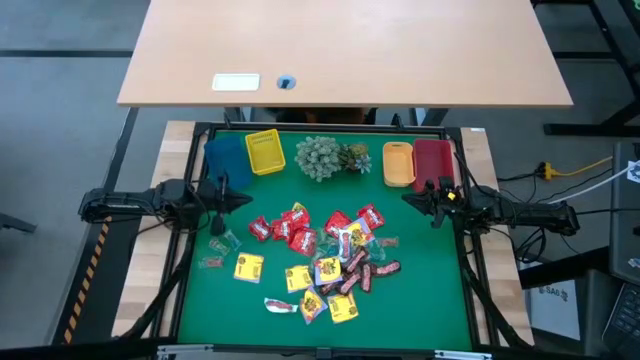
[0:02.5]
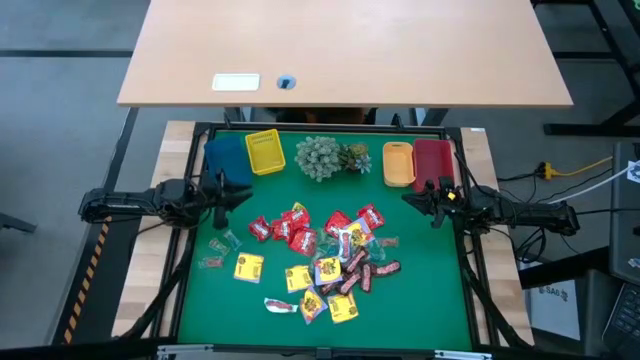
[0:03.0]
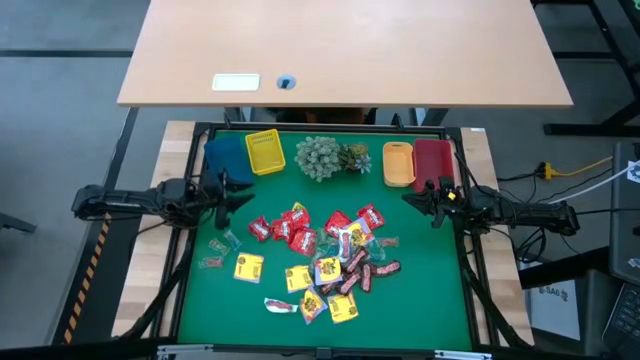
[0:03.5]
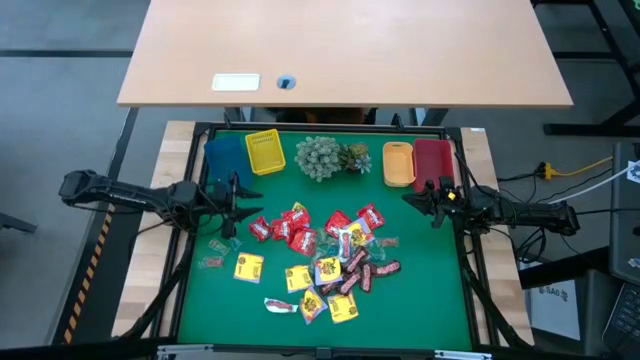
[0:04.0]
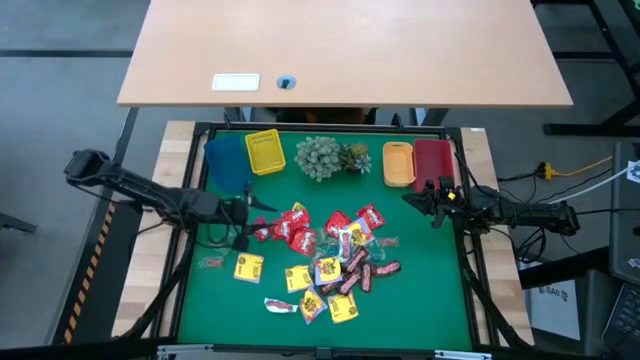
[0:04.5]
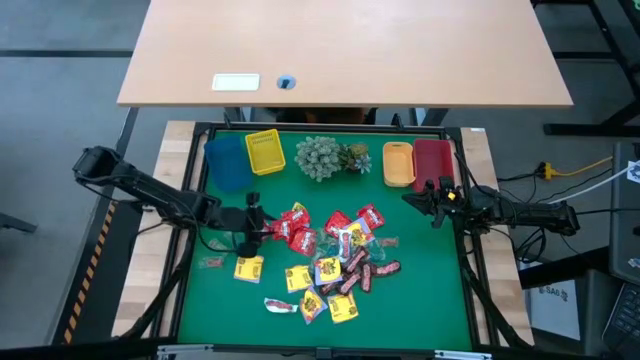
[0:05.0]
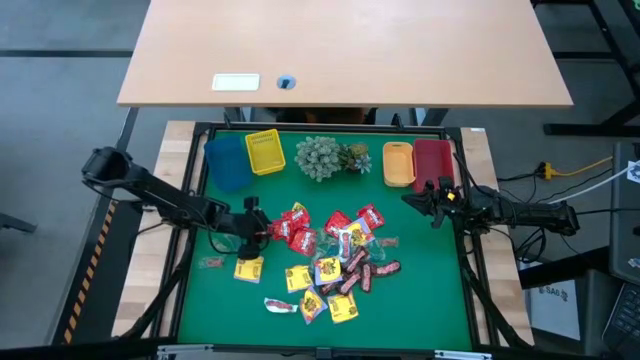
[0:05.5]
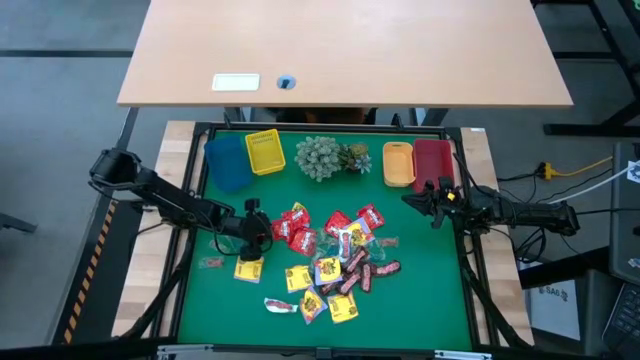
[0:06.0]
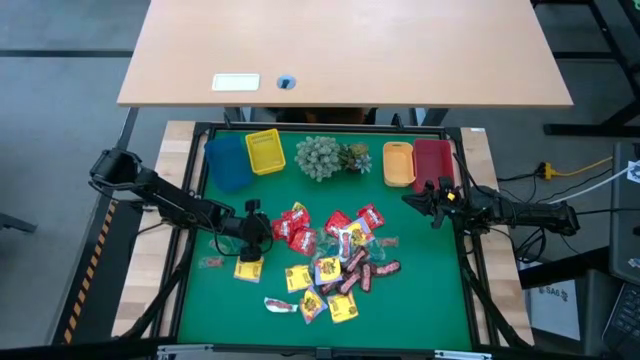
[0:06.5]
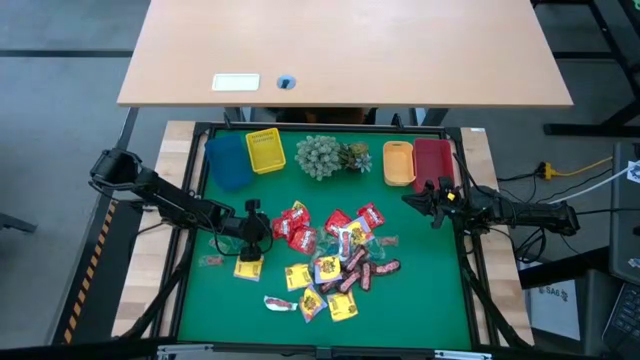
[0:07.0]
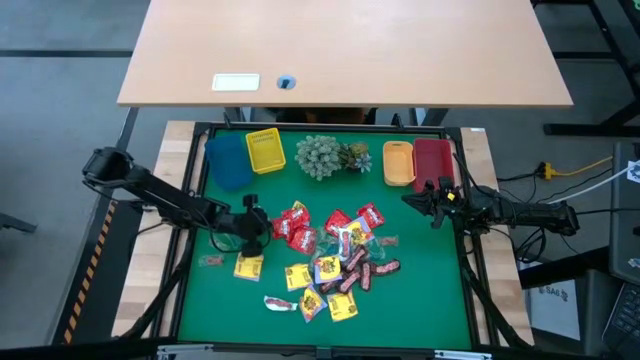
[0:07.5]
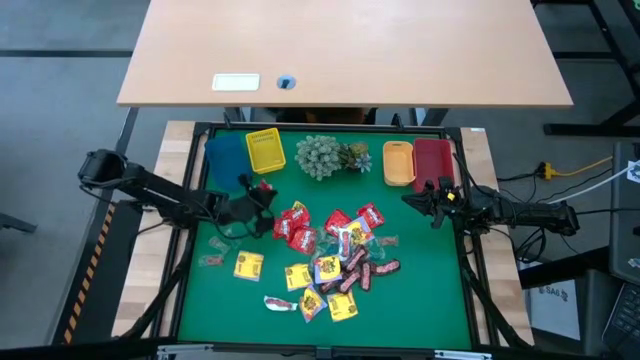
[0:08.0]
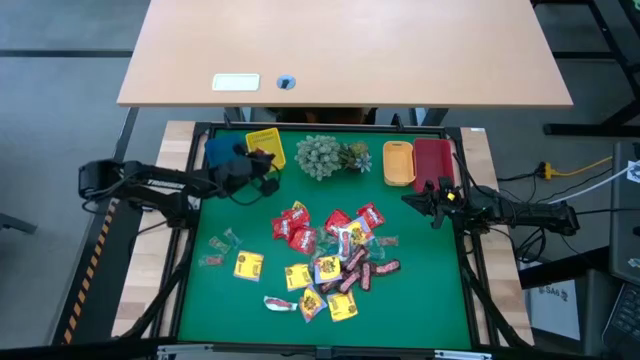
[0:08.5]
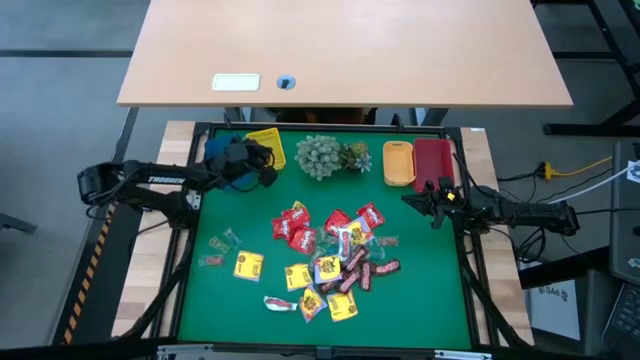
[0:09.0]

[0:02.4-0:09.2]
Task: Sort candy
Put the red candy into the yellow bin

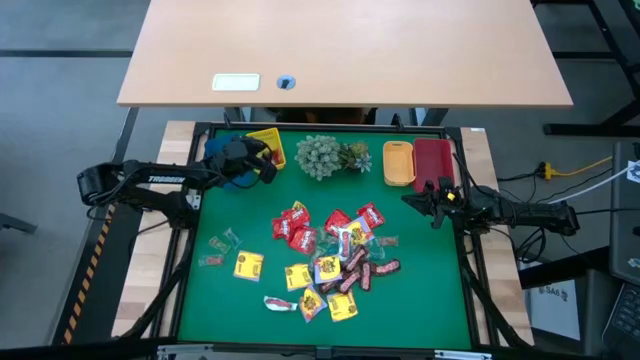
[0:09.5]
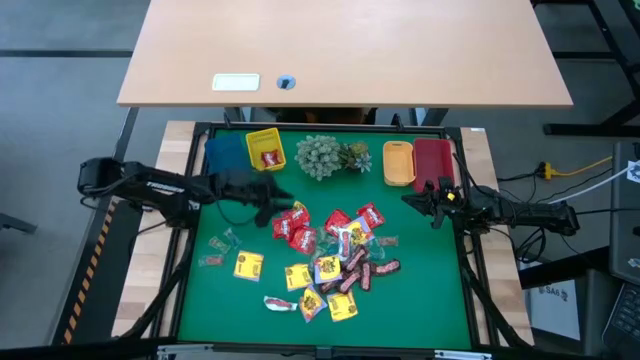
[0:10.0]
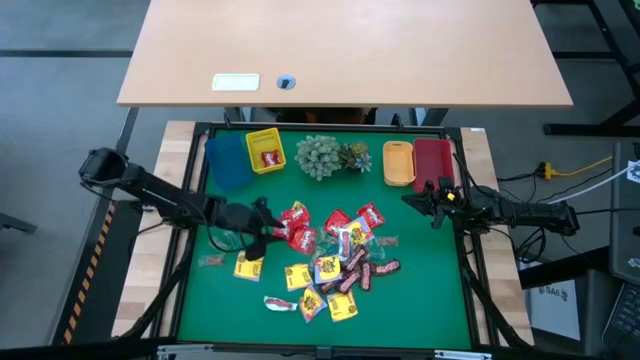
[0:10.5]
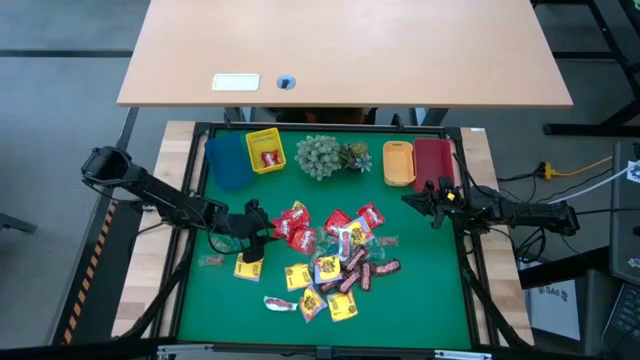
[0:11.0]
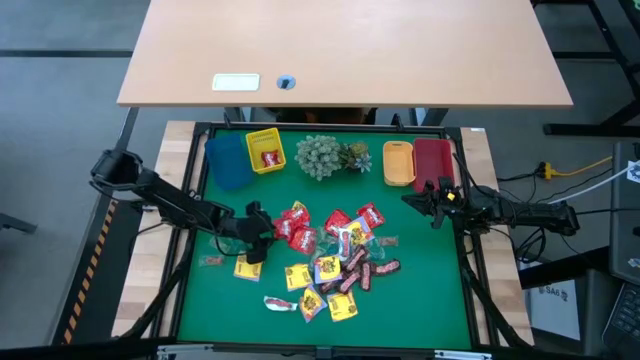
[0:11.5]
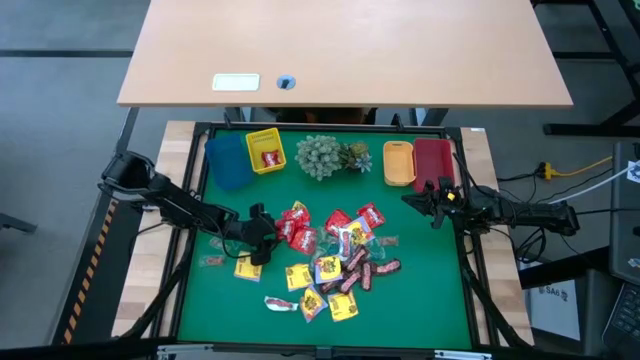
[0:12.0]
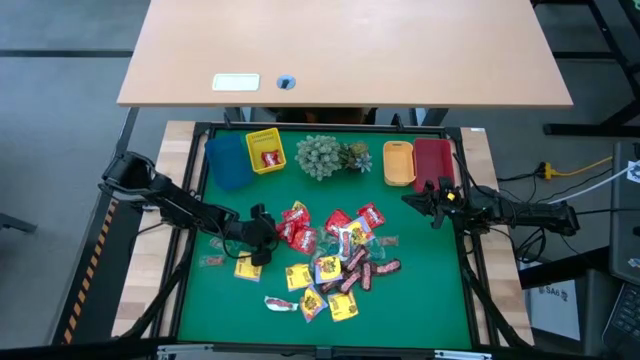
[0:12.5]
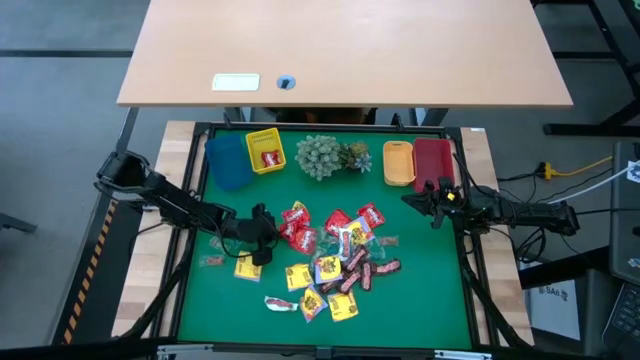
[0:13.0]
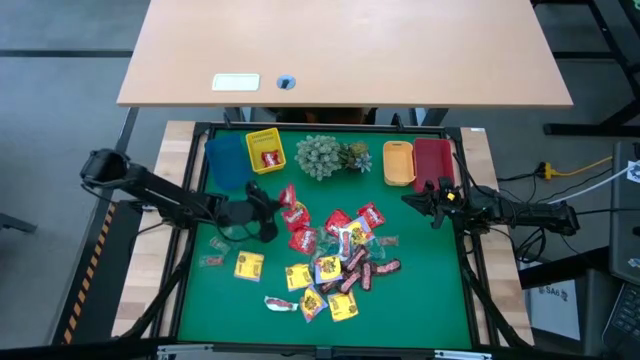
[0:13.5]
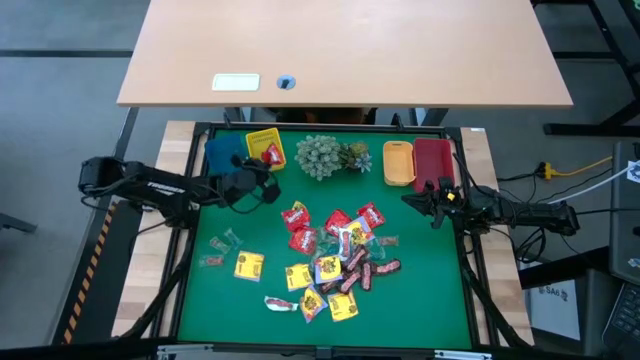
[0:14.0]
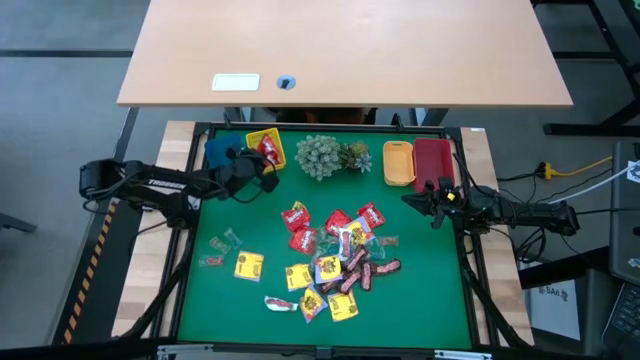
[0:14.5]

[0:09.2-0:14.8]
Put the red candy into the yellow bin

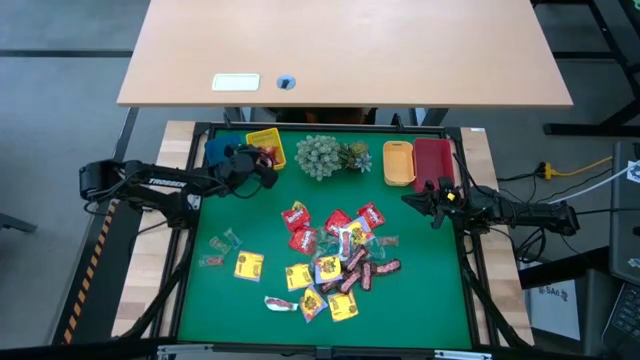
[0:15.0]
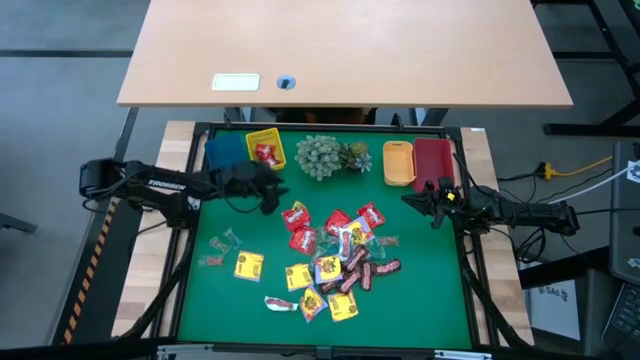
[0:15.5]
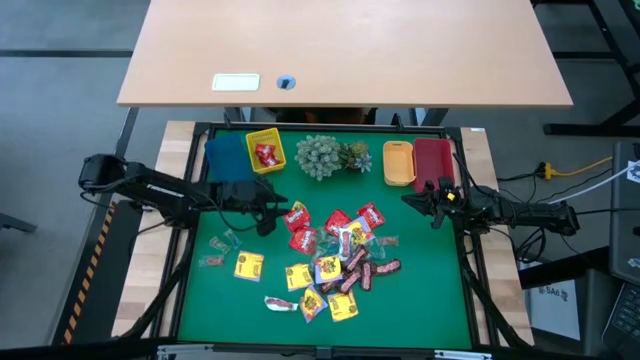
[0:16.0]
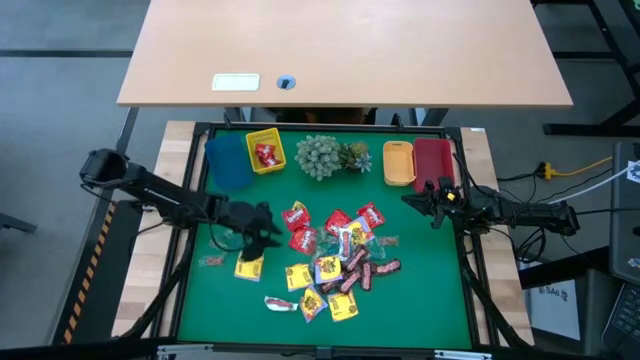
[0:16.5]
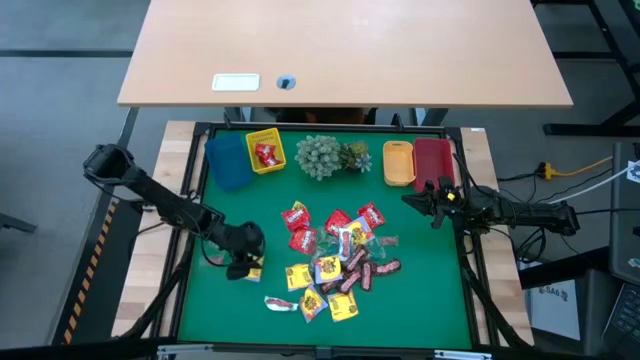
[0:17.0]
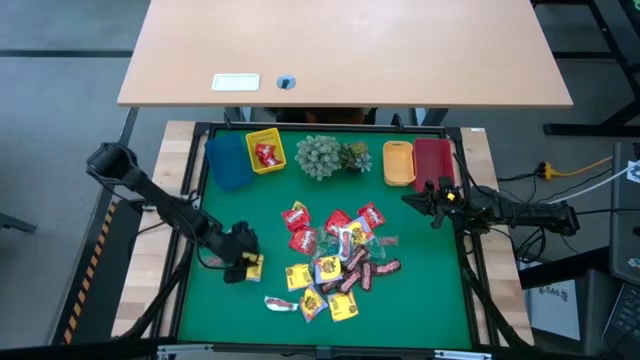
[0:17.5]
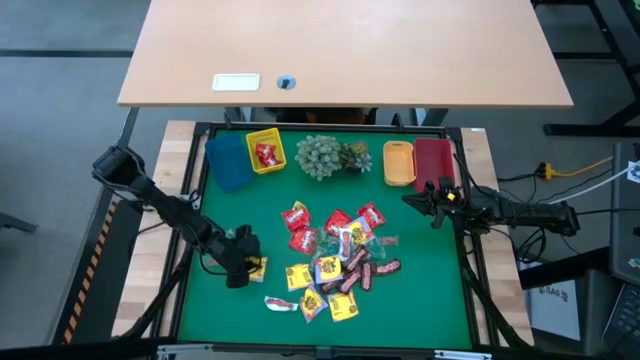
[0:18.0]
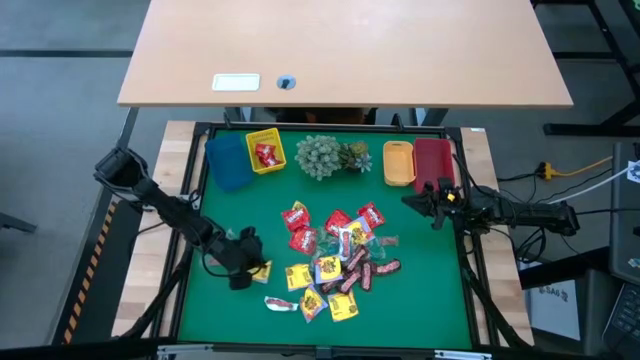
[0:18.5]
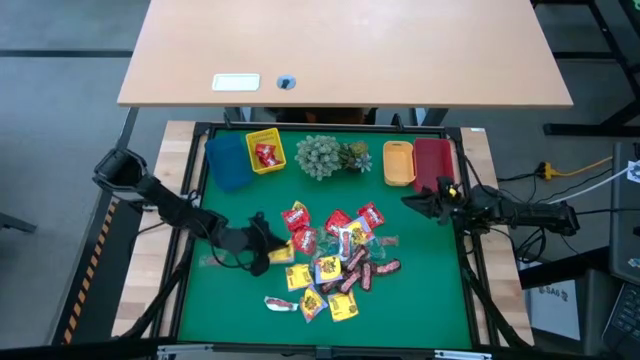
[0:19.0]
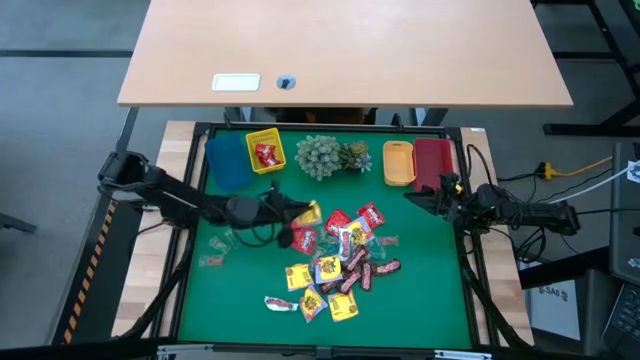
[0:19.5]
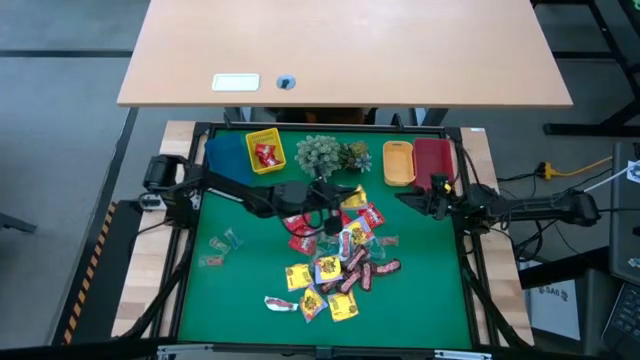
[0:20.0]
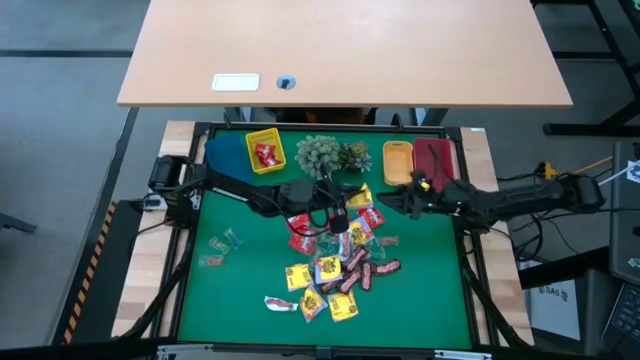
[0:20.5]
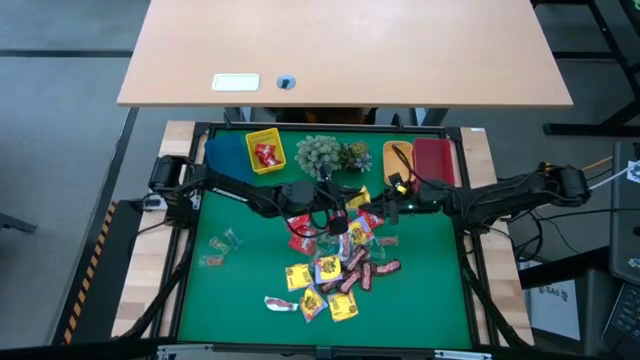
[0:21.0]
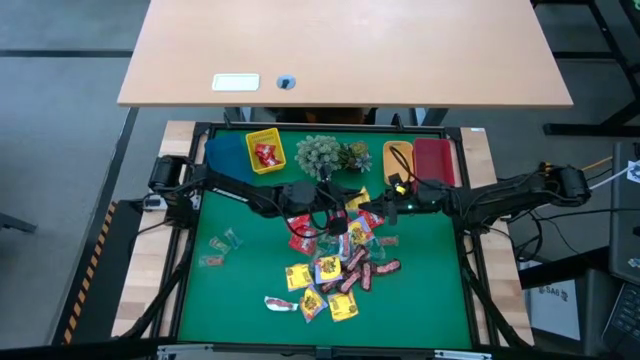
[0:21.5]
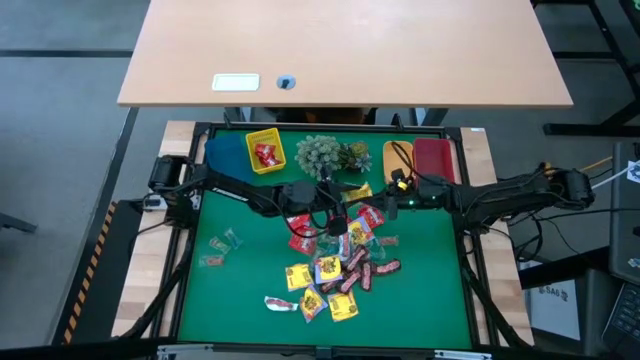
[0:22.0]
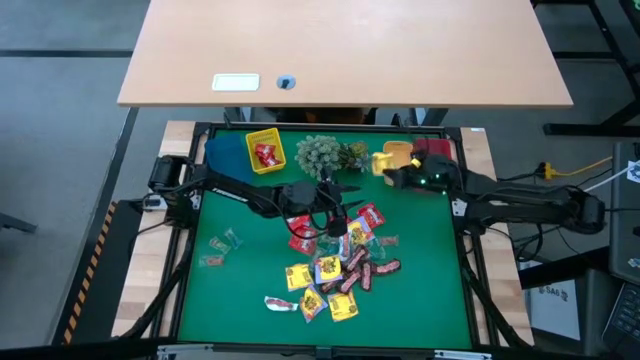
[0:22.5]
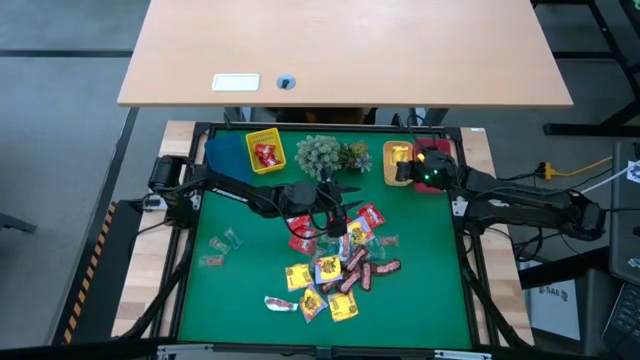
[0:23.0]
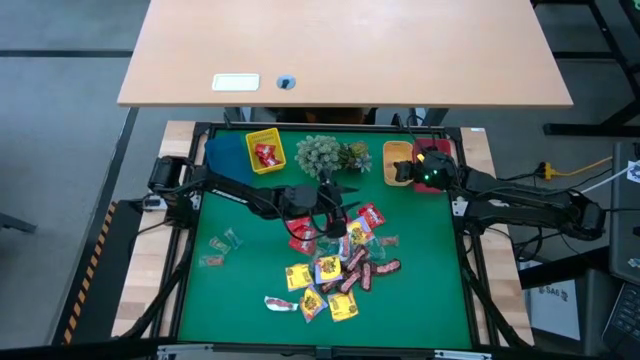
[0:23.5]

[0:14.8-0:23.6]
Put the yellow candy into the orange bin
